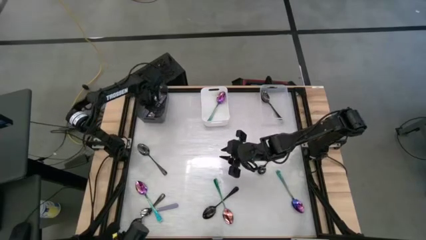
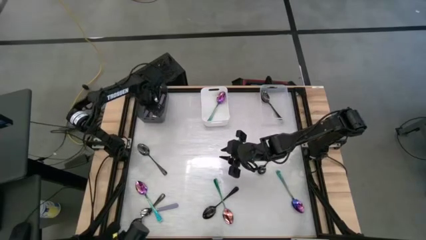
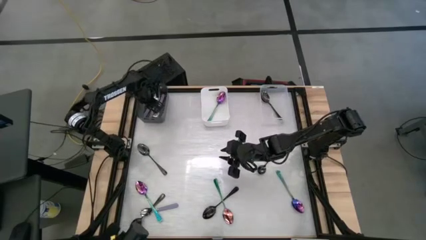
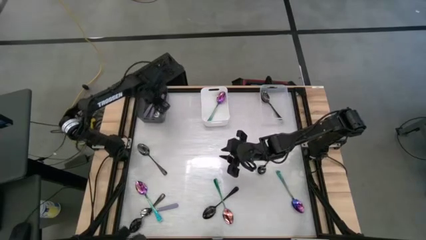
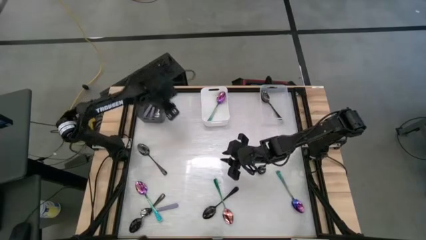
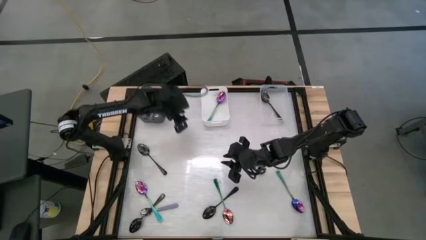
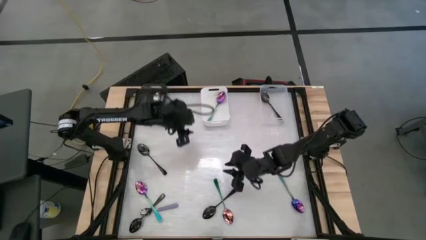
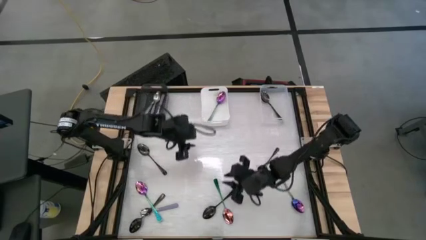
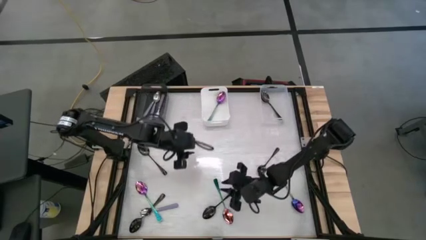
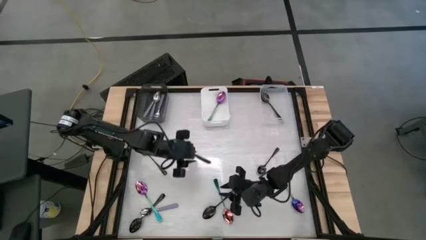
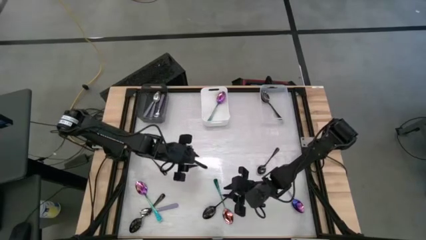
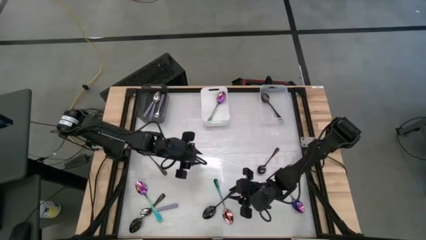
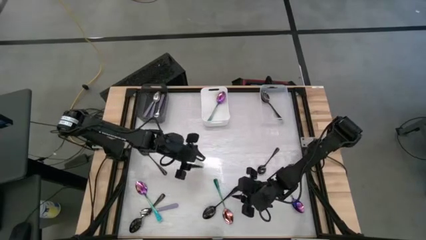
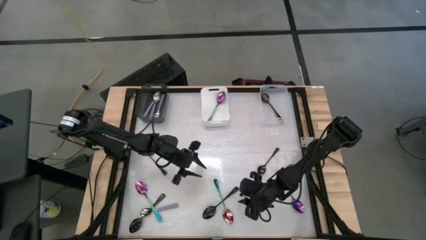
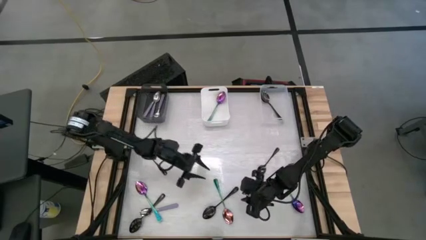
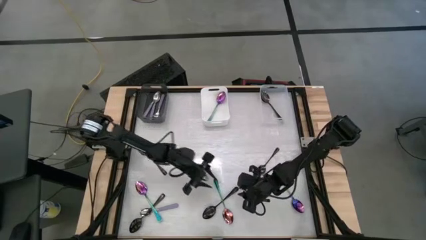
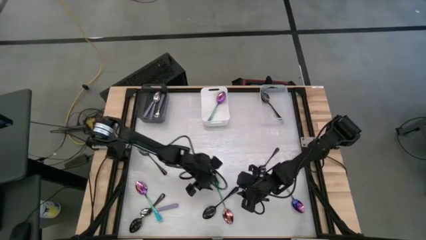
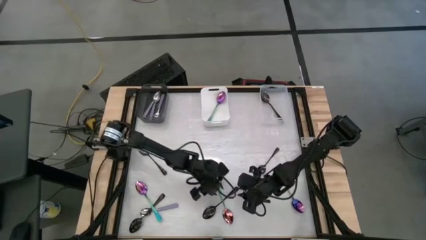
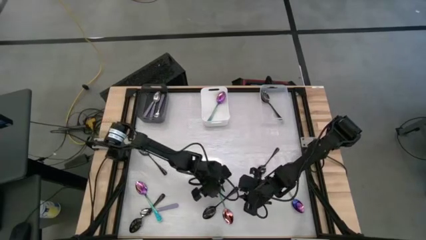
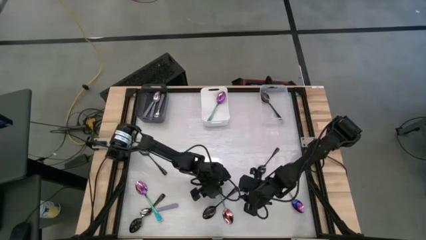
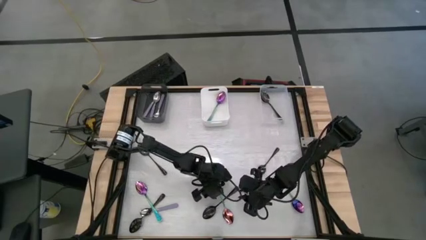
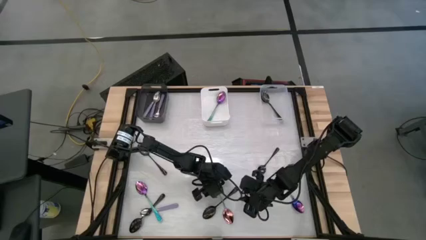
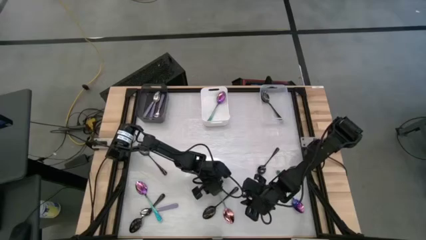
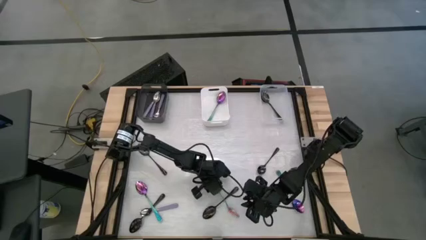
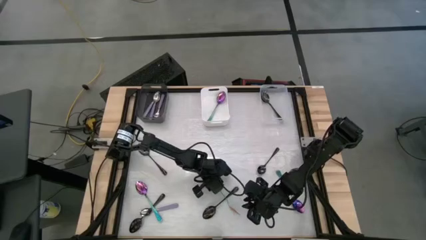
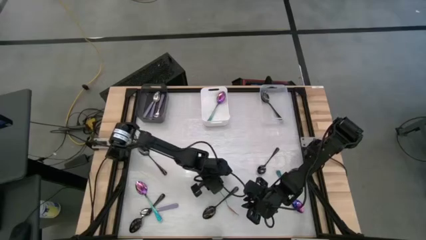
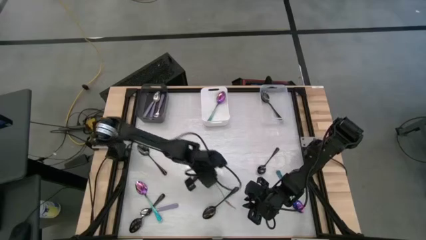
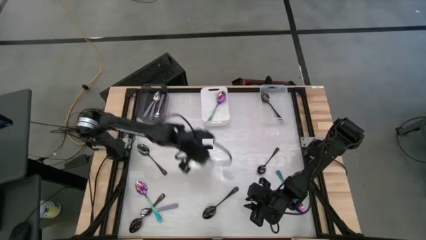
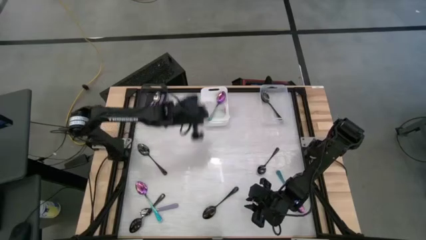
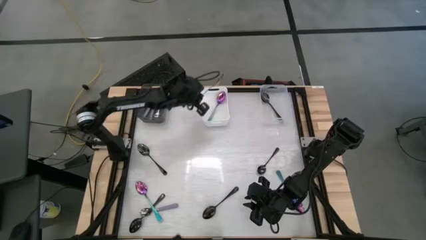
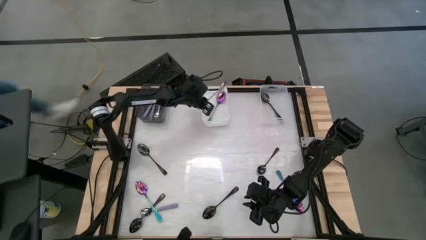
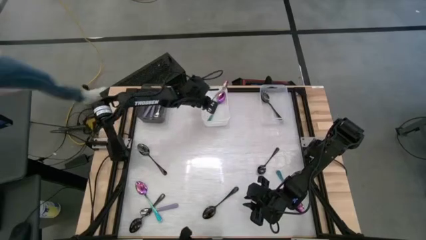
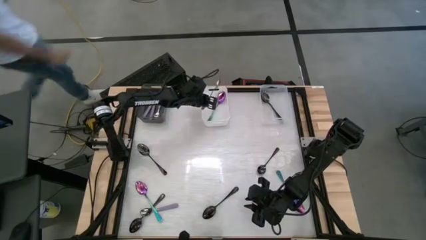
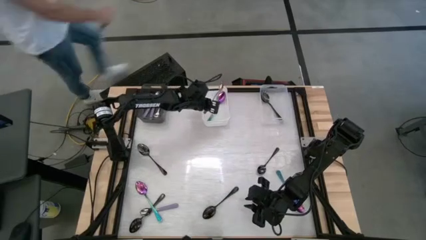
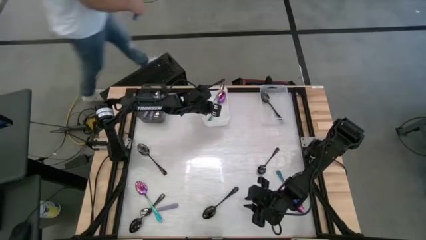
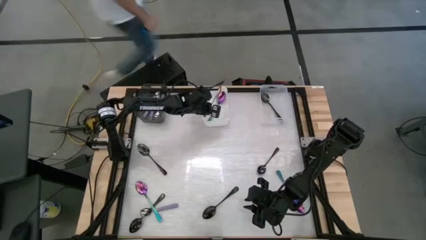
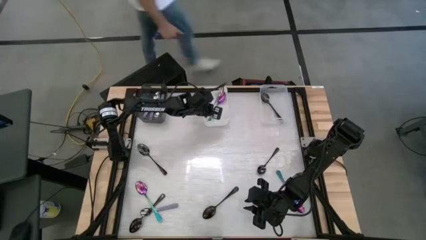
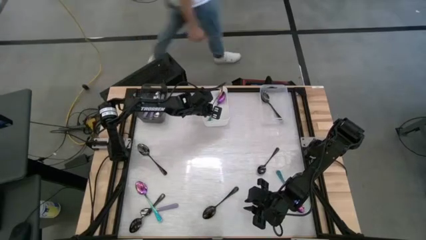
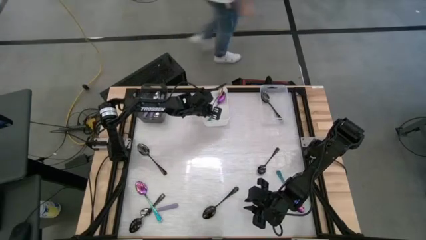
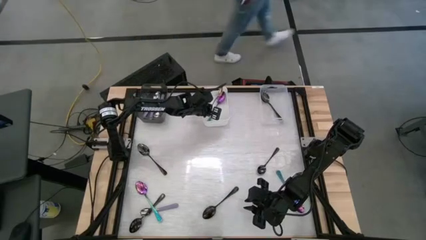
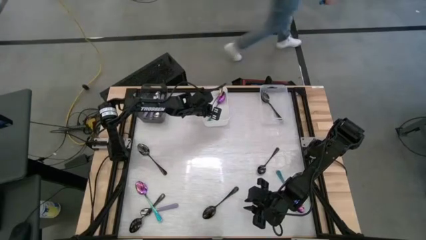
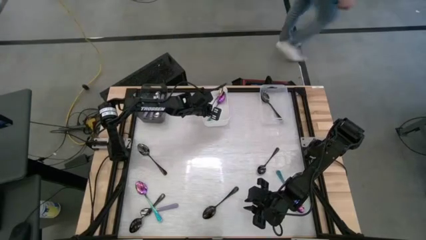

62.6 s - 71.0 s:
Task: Sort silverware by color (type)
Put the blue spoon into the white bin

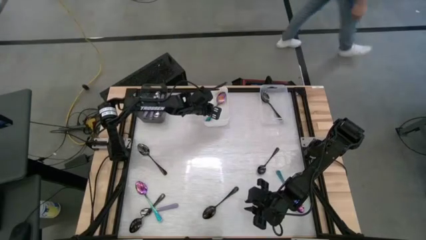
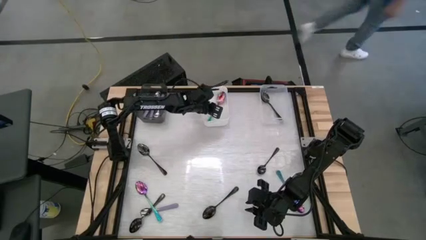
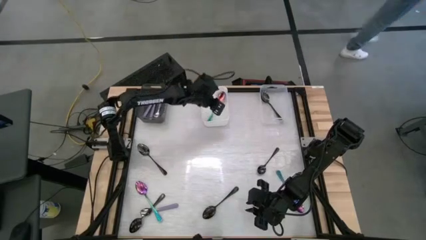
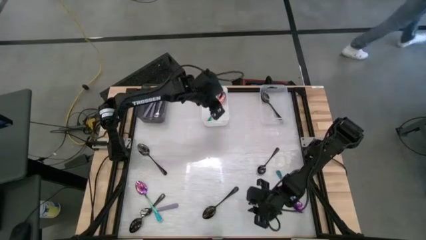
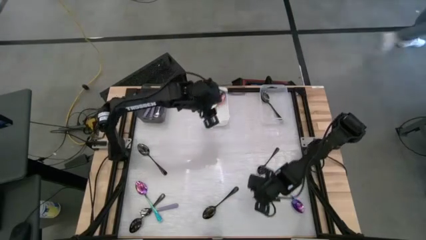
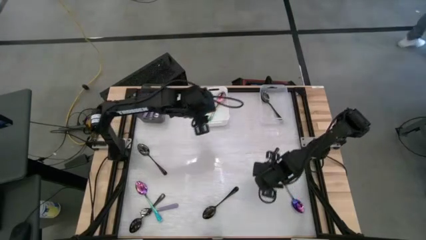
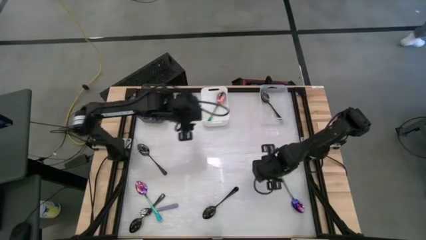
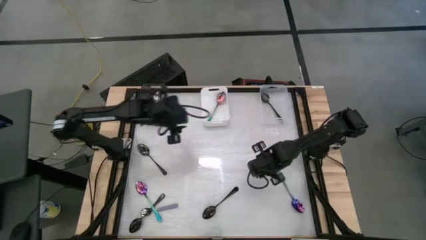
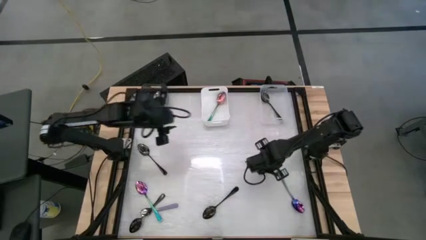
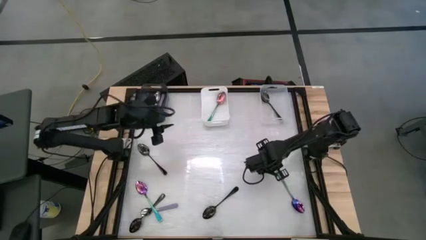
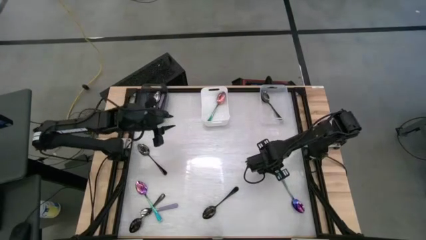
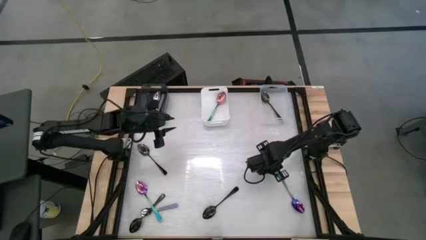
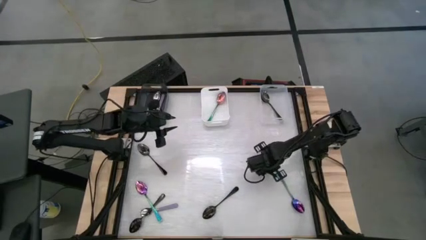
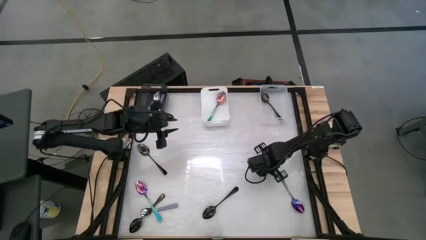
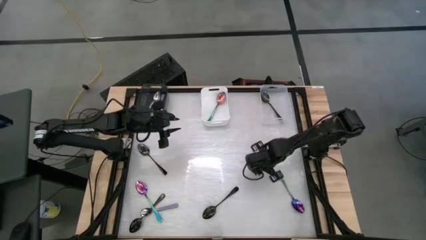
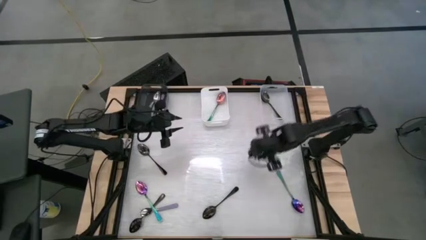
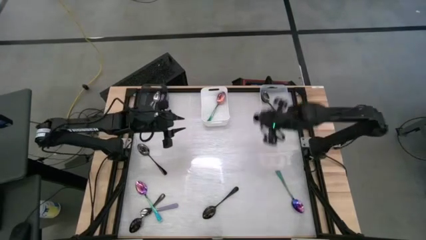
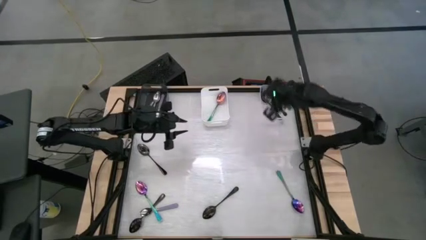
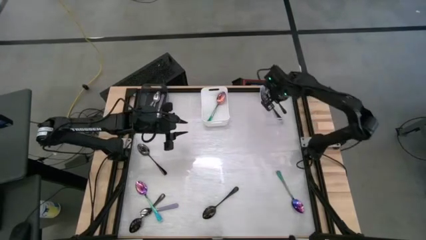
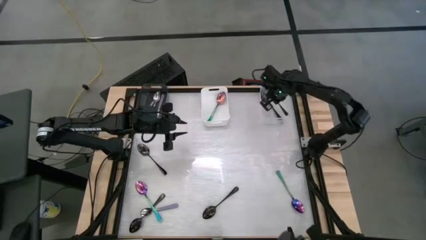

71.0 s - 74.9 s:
Put the black spoon into the transparent bin

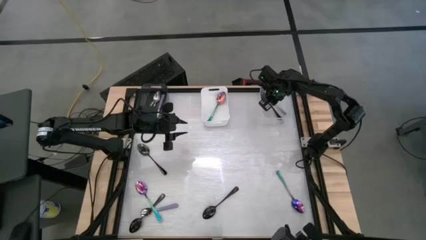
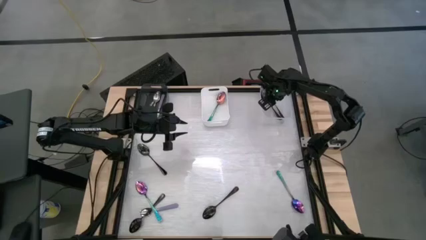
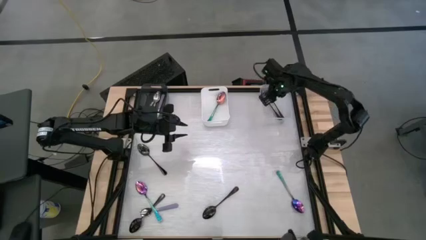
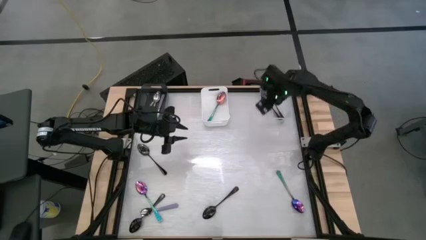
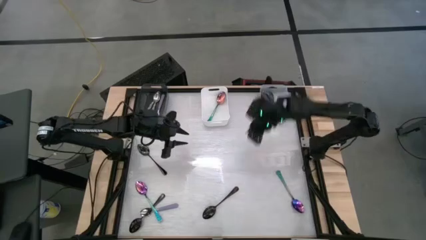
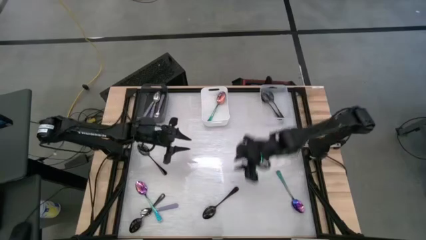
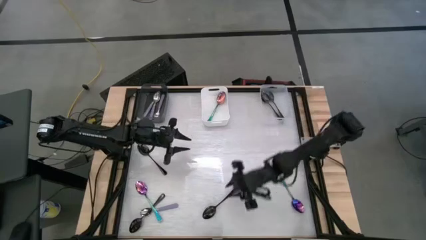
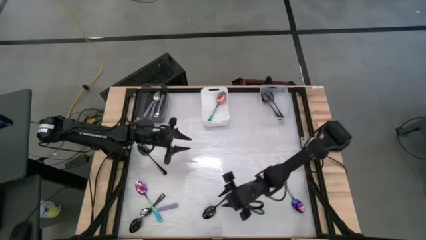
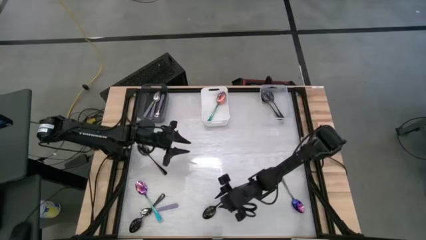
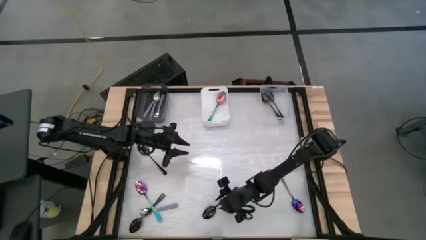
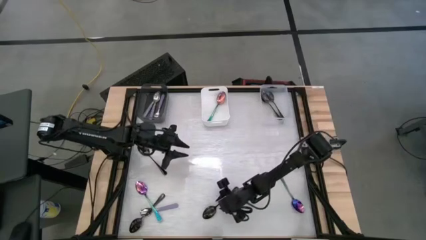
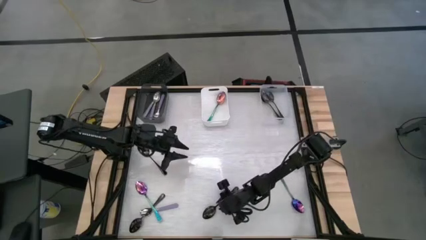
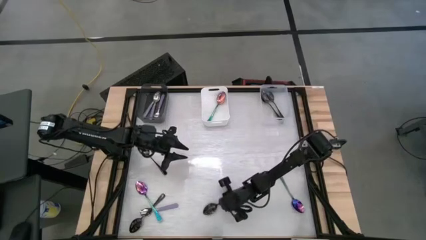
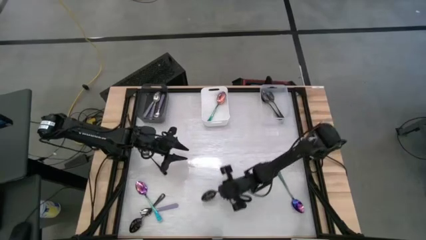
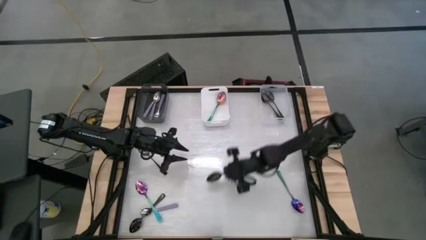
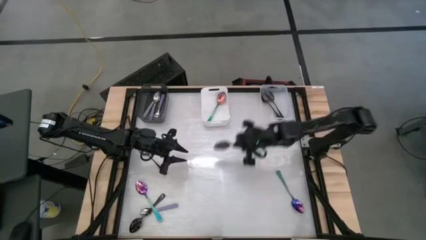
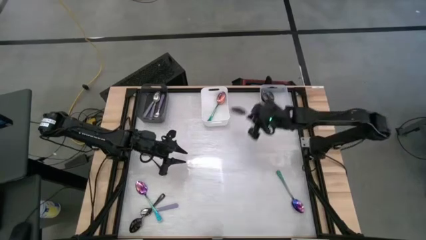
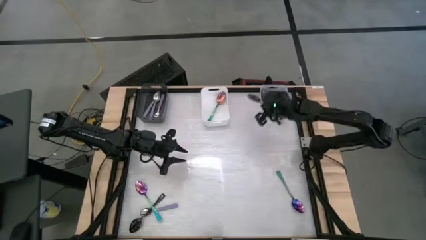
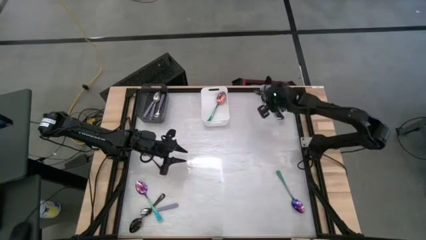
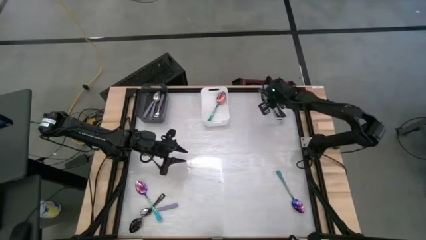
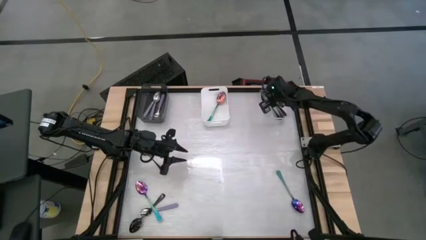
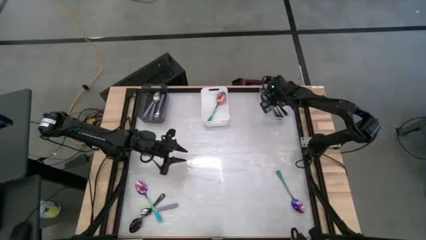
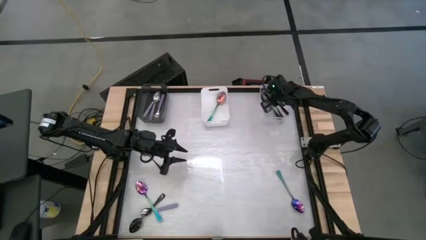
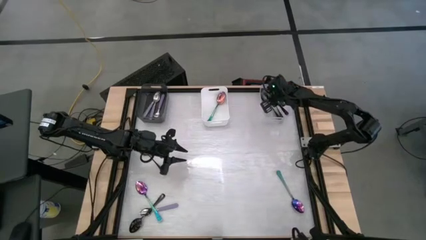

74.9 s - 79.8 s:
Put the black spoon into the transparent bin

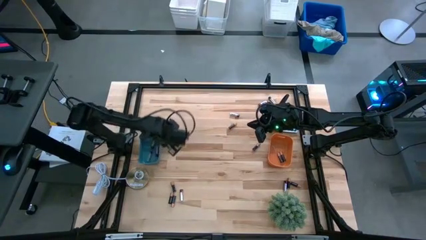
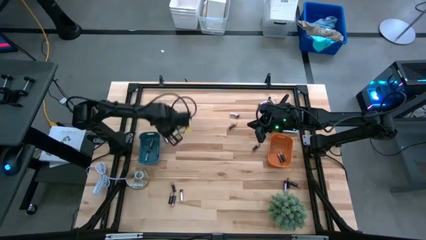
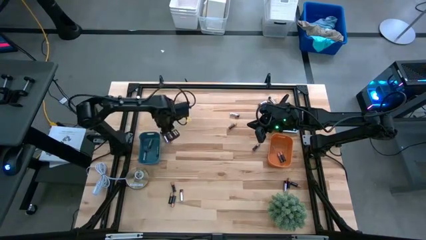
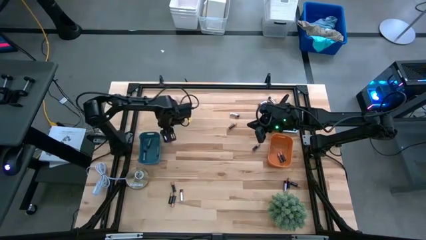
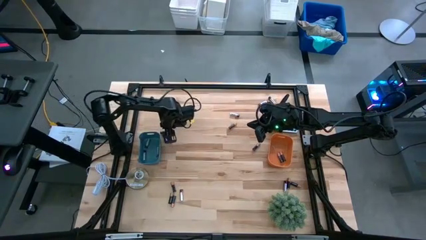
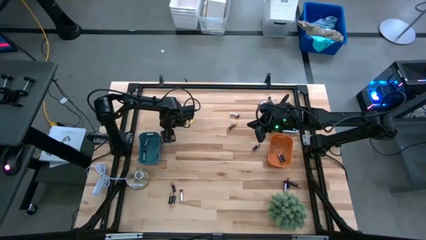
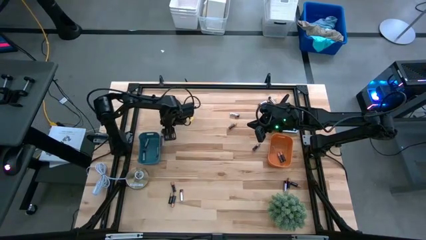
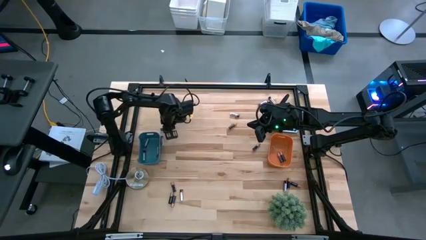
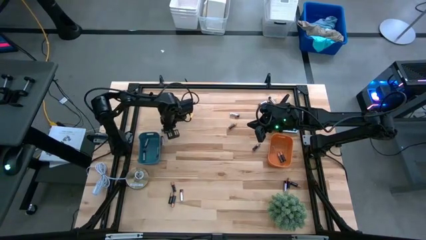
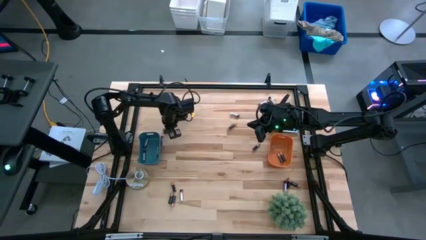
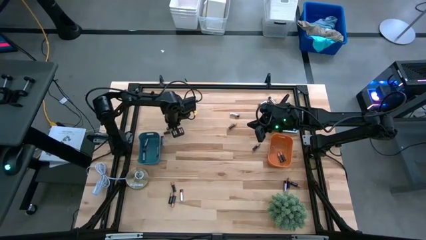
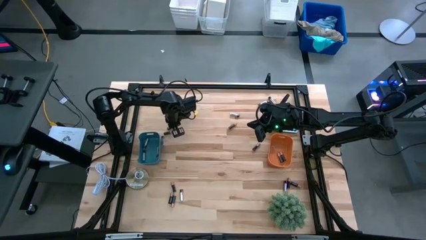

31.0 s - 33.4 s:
Task: Sort batteries
Put the black battery into the orange bin
